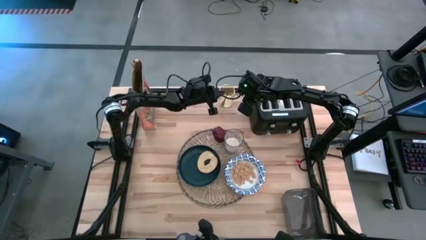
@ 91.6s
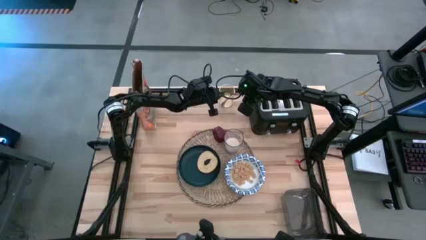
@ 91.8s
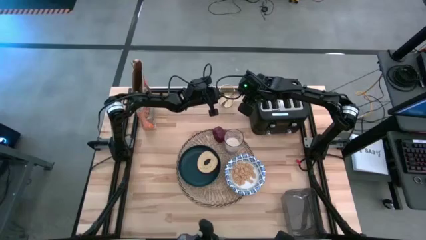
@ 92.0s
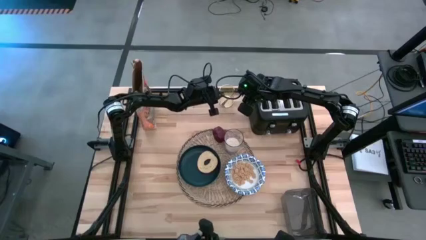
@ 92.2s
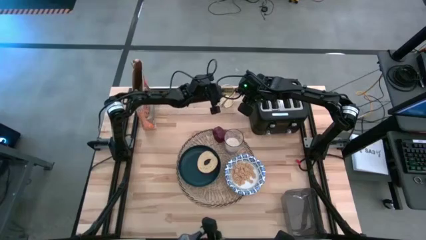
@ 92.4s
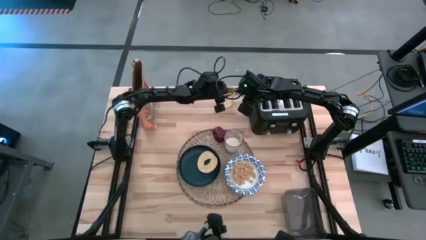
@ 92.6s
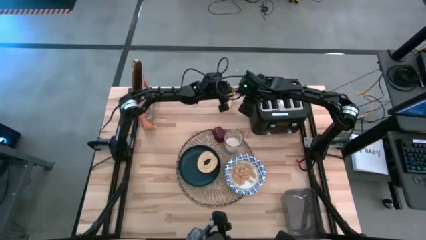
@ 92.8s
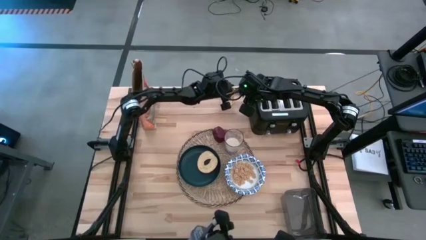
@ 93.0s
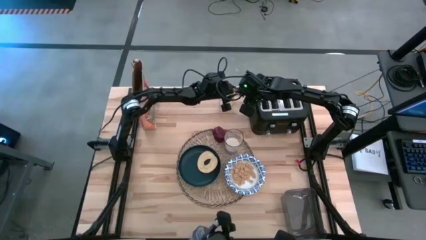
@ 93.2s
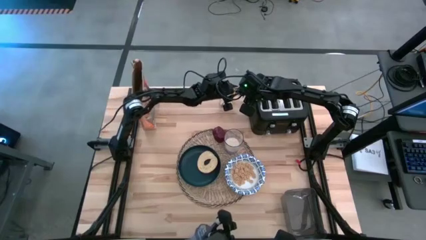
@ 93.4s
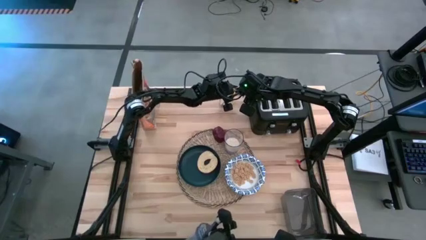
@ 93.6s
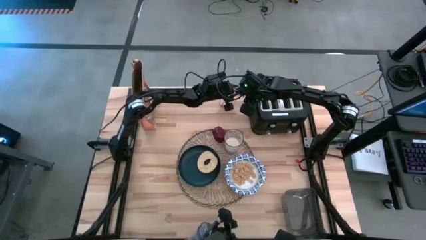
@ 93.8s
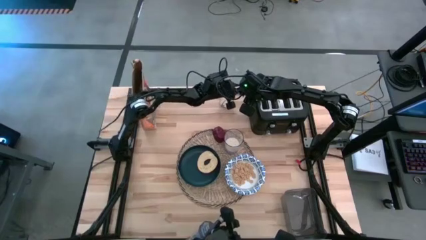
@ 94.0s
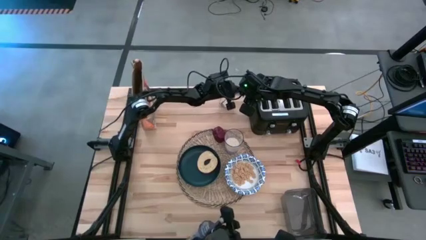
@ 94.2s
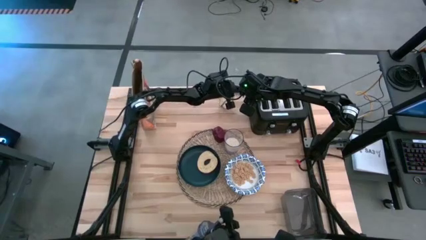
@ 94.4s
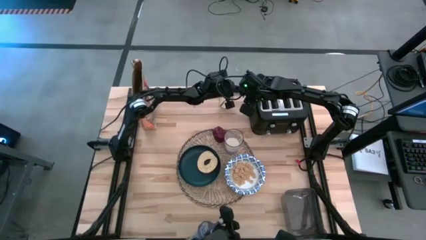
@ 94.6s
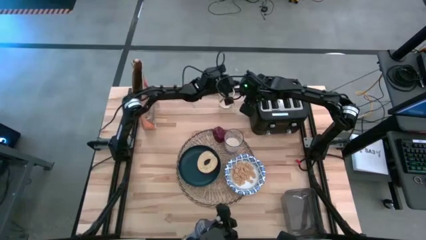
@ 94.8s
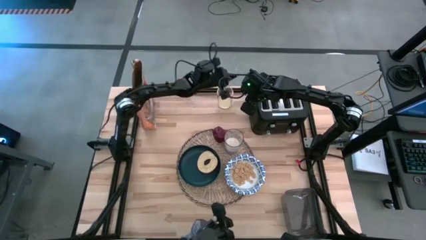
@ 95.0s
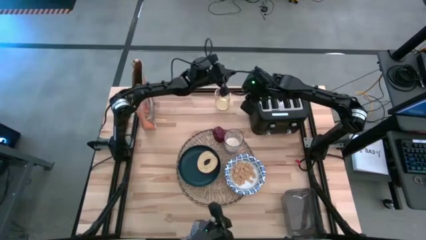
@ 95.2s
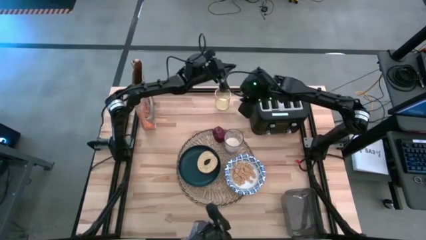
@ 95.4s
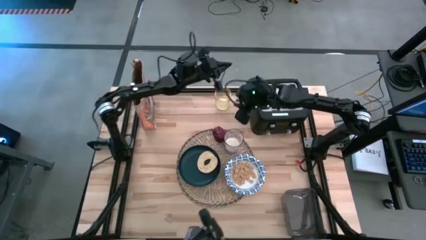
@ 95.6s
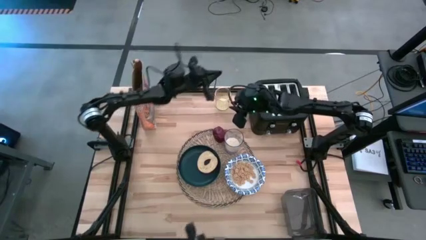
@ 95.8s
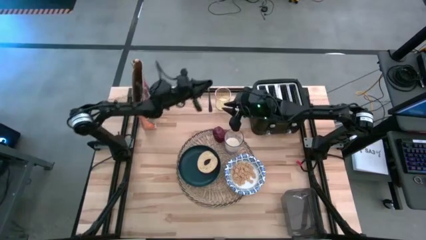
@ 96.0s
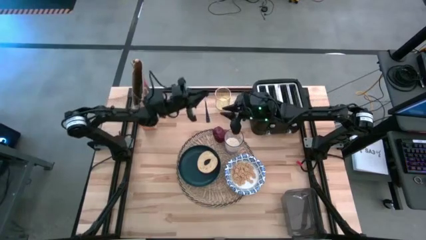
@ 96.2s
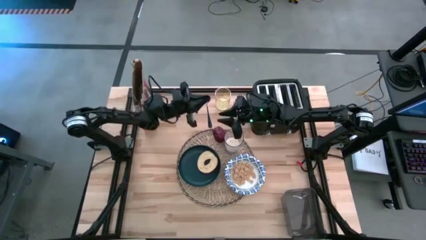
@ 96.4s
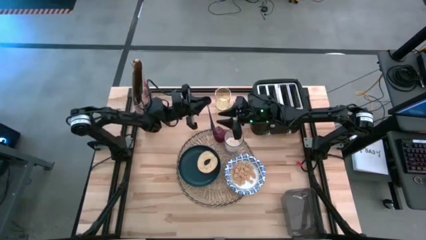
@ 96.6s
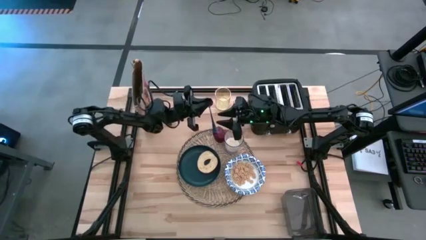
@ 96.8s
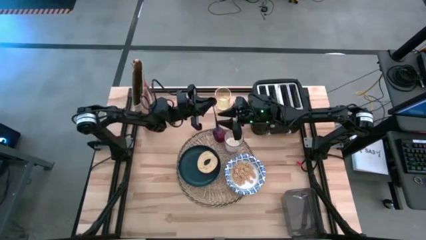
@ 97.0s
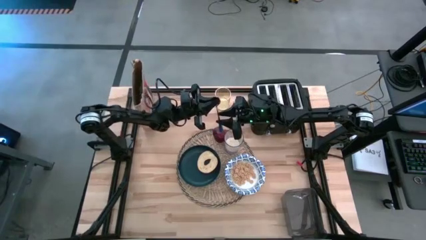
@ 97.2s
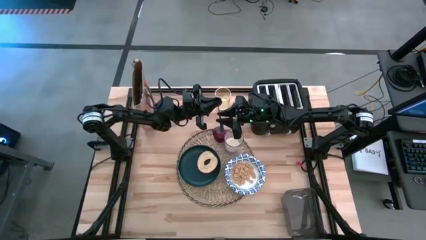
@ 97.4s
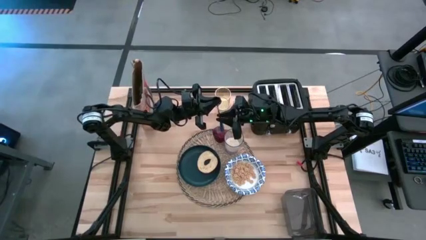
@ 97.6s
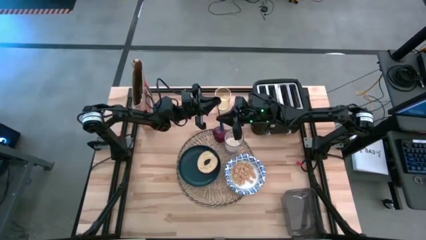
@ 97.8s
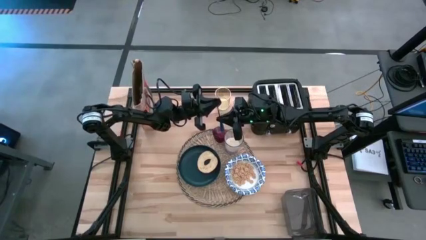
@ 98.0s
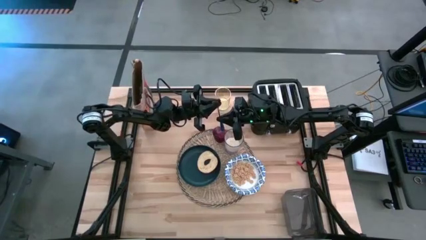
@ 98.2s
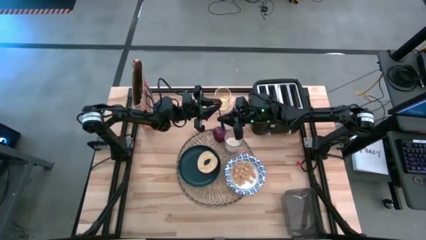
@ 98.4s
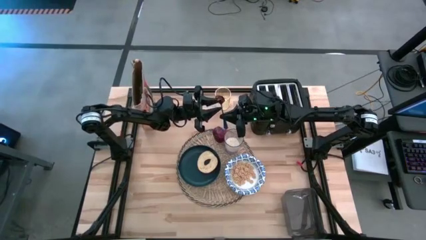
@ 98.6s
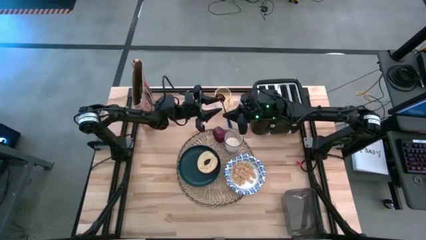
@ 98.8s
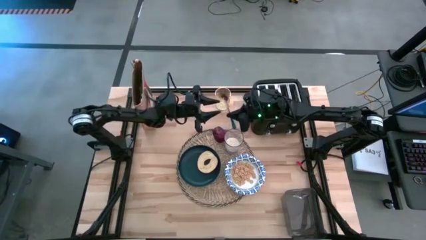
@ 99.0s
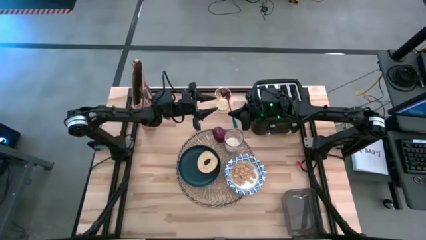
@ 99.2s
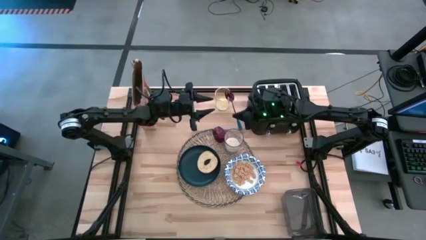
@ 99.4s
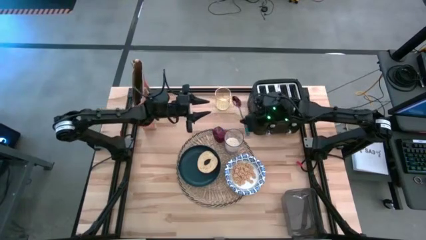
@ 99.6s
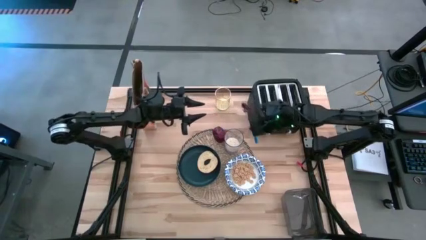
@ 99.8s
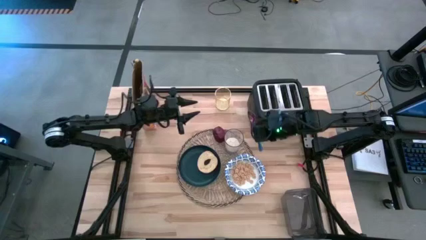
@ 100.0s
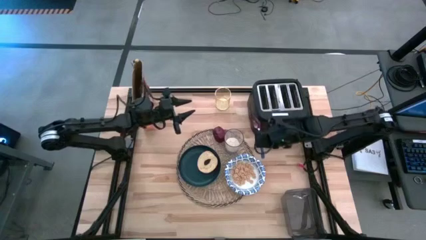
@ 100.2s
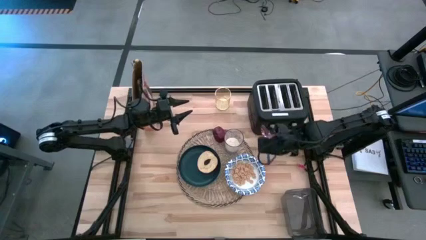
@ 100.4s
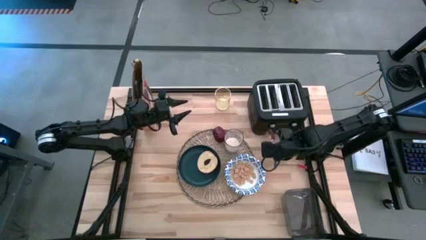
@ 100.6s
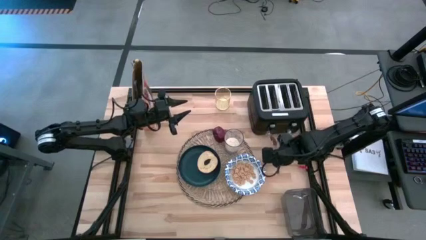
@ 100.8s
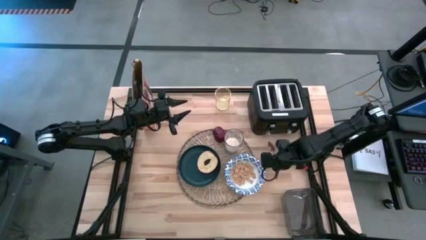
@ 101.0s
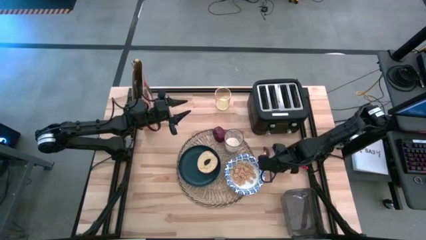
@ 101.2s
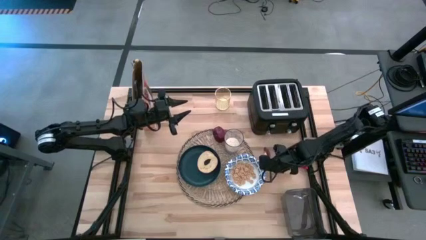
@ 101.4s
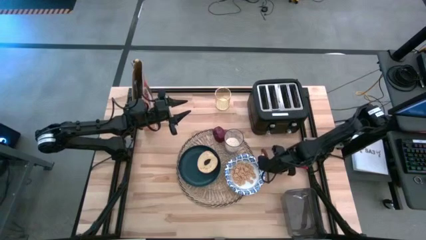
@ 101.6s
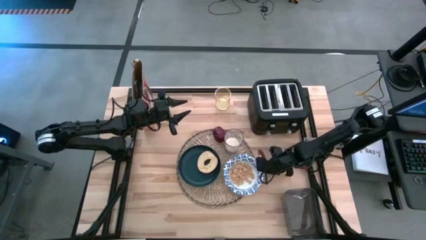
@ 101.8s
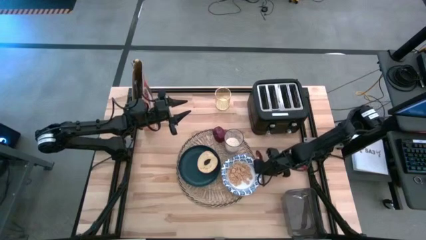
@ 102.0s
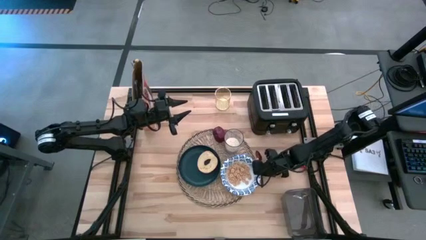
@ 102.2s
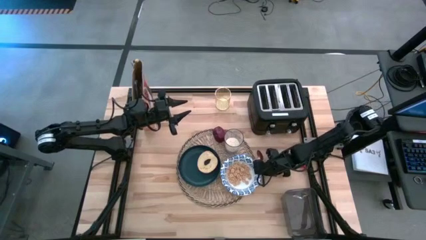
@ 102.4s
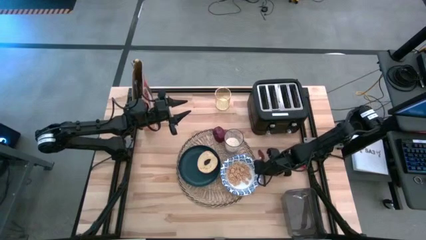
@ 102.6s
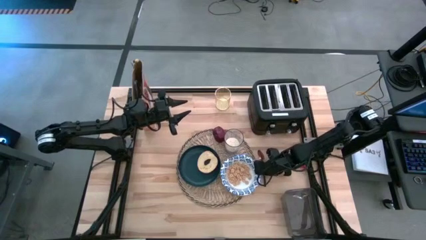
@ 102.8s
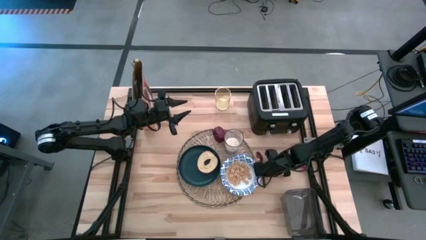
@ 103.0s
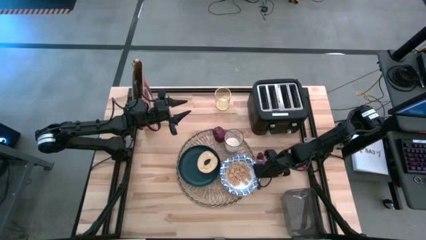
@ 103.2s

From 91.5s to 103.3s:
Task: Arrange a breakfast setting
Put the blue spoon beside the placemat

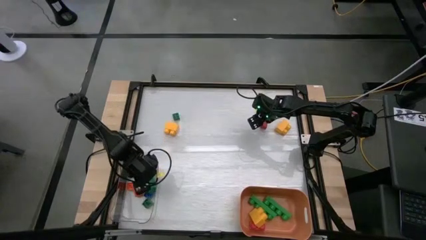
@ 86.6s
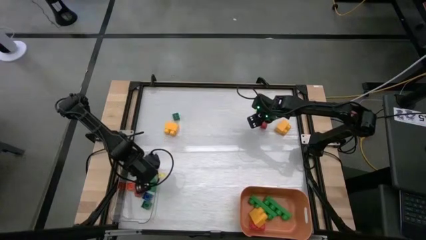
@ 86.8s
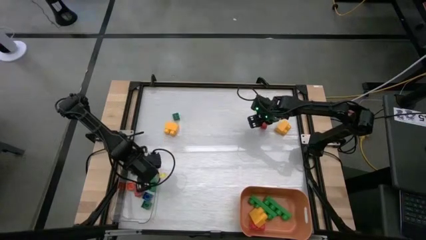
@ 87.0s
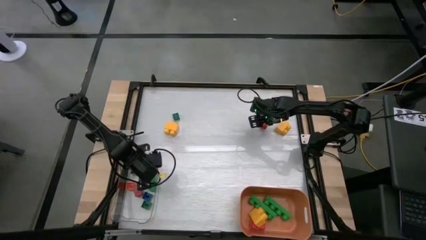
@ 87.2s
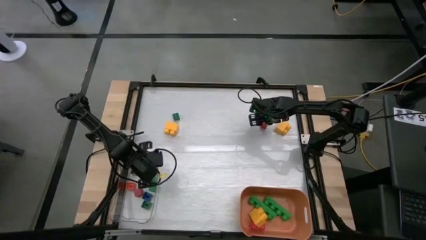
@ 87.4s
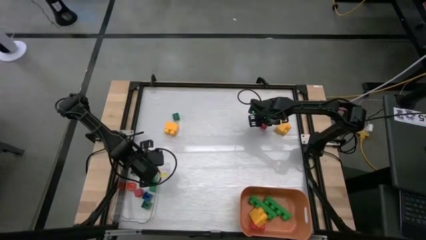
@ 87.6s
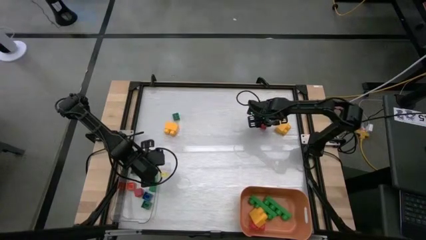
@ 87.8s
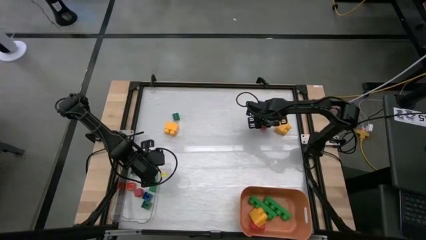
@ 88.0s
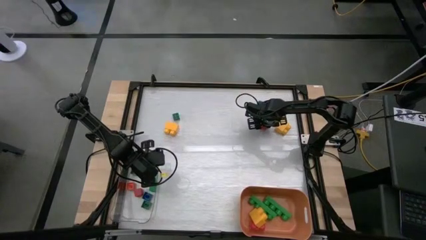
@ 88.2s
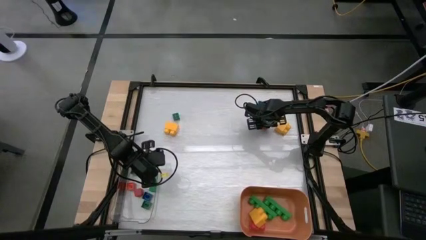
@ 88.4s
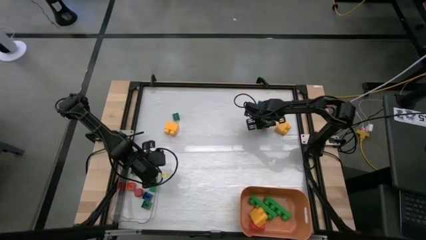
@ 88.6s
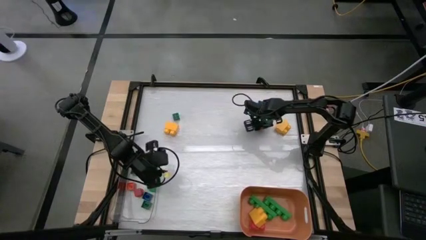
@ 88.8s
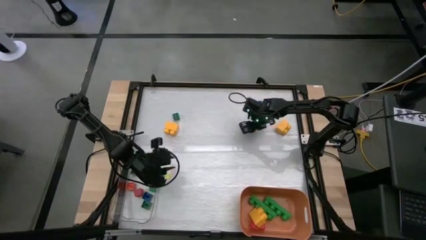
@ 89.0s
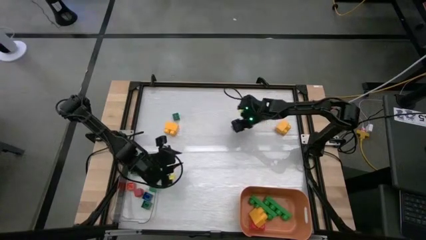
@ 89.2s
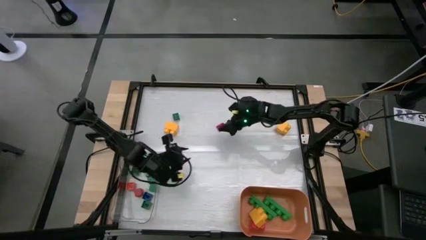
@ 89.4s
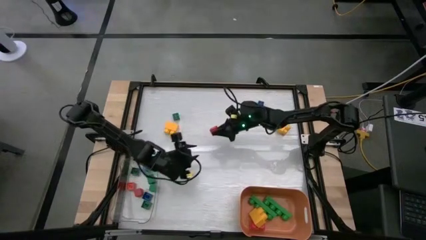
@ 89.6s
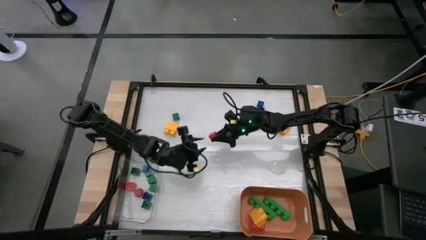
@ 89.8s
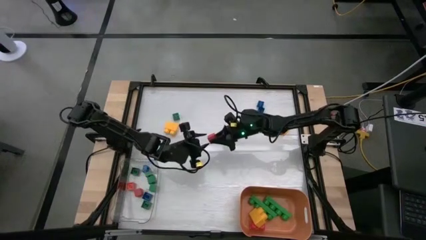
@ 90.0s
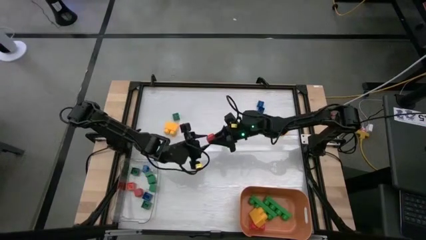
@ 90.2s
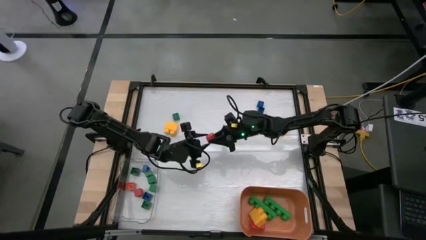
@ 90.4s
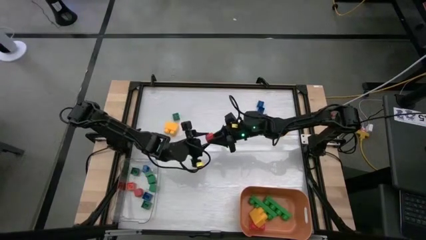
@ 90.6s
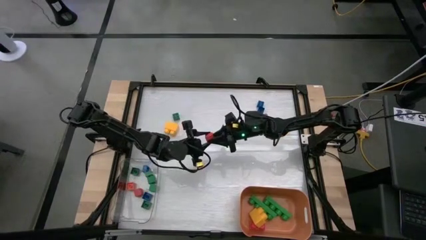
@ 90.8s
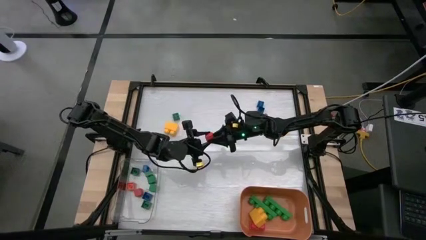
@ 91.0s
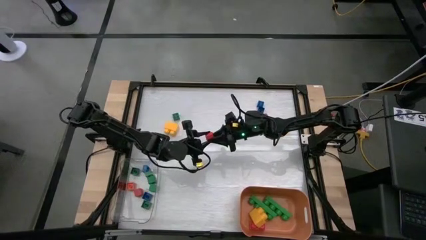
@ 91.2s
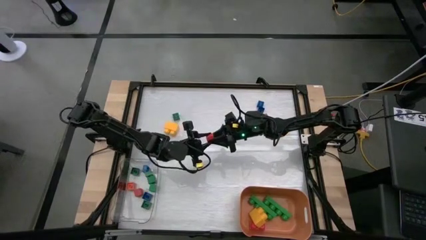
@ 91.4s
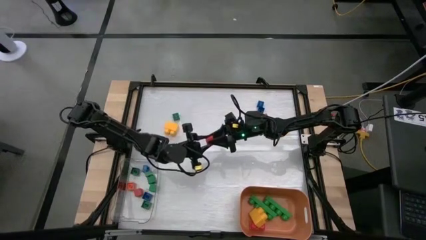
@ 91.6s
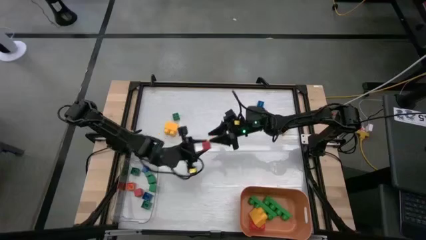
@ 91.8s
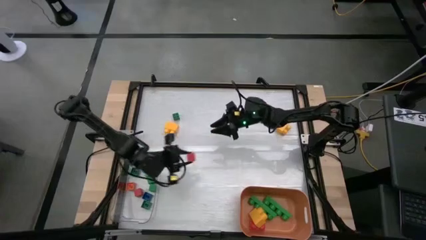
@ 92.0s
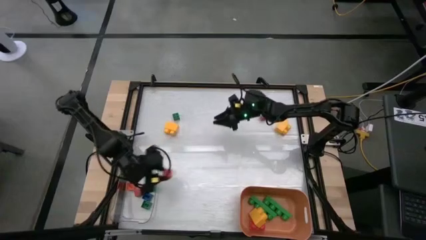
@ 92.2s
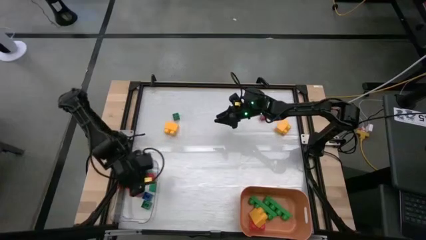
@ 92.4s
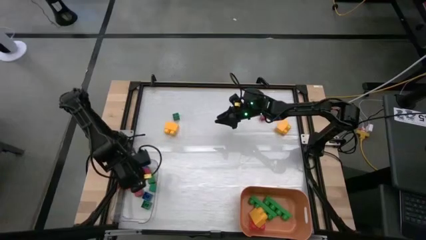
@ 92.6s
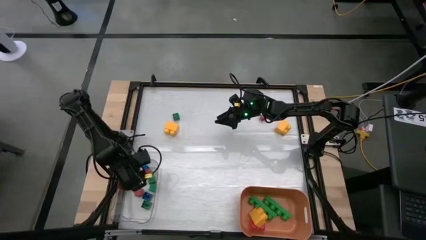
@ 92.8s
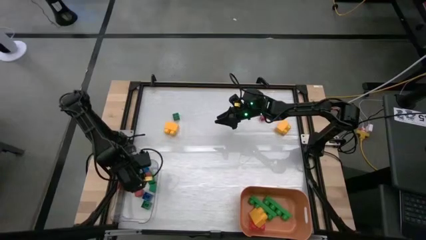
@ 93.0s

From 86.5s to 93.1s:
Task: Sort blocks by size
Put the small red block into the transparent bin
